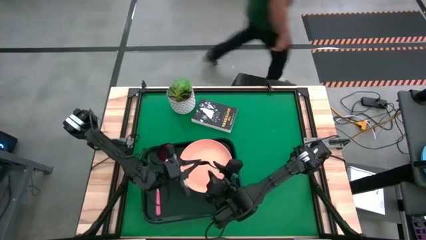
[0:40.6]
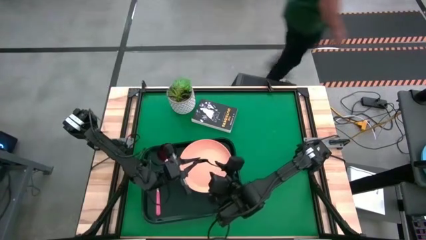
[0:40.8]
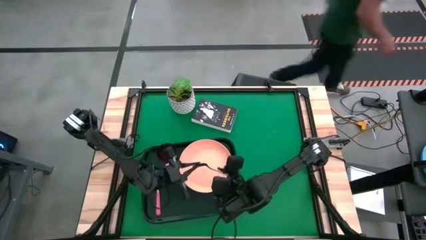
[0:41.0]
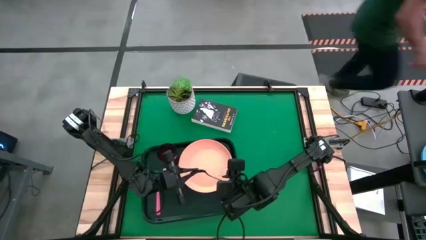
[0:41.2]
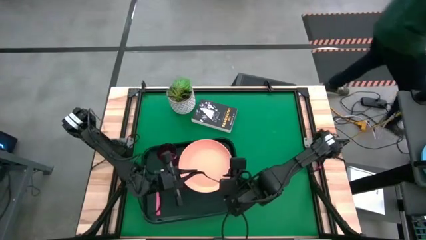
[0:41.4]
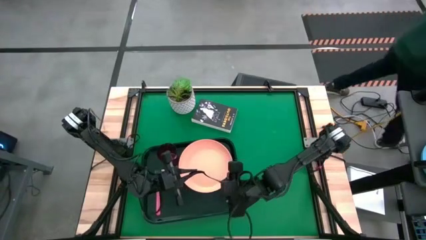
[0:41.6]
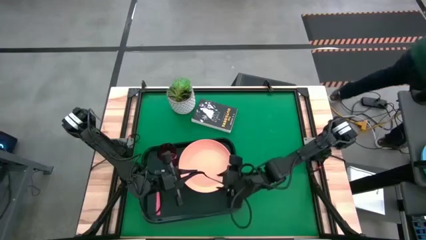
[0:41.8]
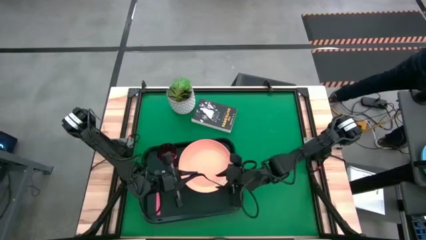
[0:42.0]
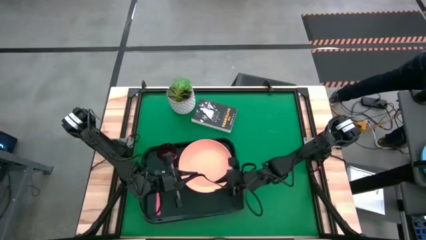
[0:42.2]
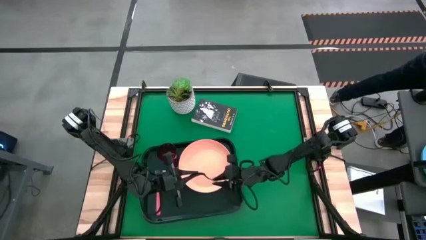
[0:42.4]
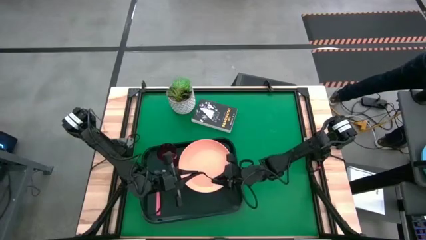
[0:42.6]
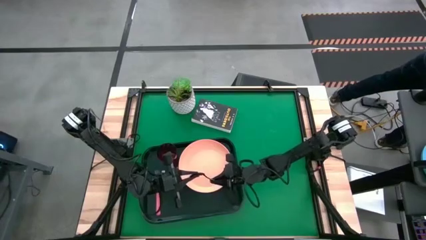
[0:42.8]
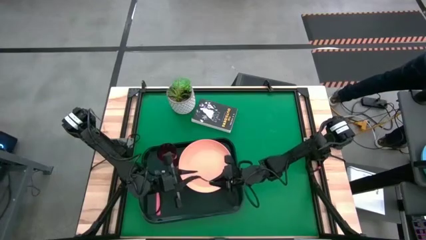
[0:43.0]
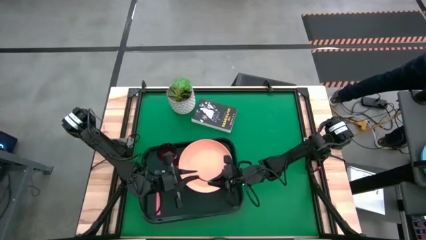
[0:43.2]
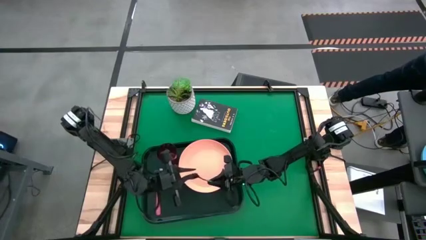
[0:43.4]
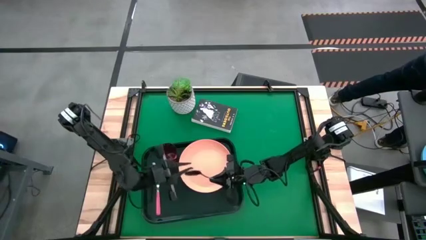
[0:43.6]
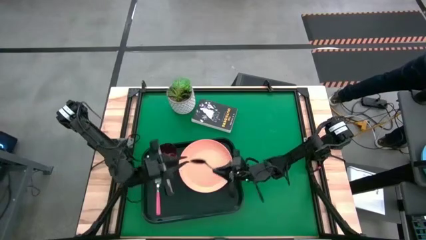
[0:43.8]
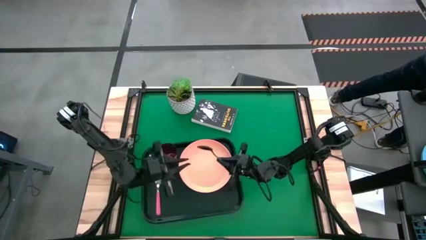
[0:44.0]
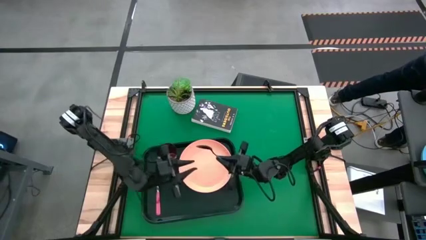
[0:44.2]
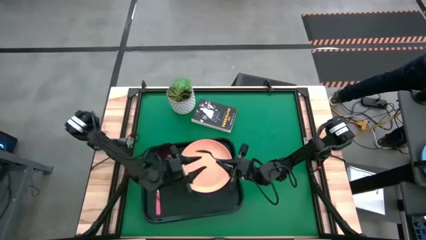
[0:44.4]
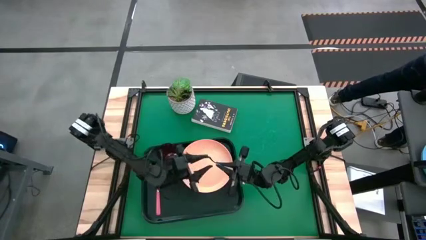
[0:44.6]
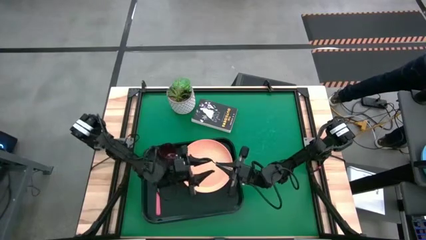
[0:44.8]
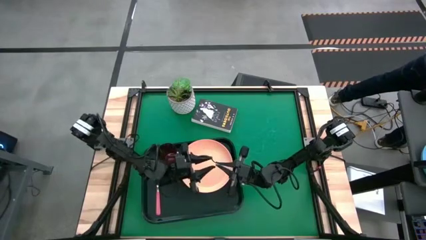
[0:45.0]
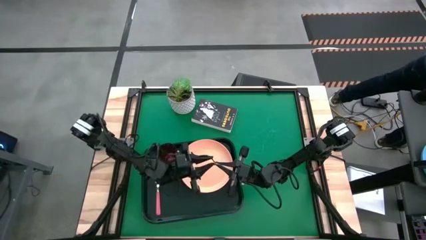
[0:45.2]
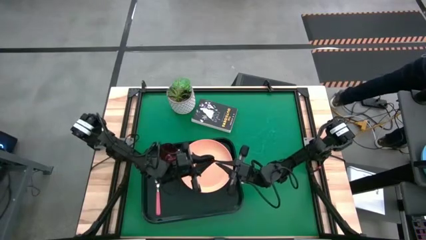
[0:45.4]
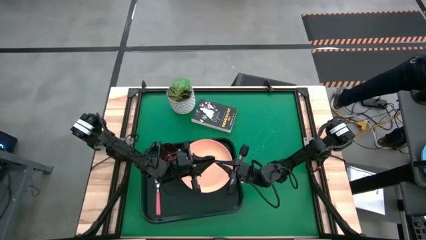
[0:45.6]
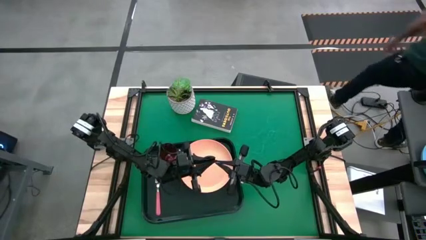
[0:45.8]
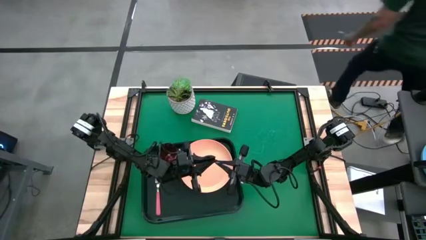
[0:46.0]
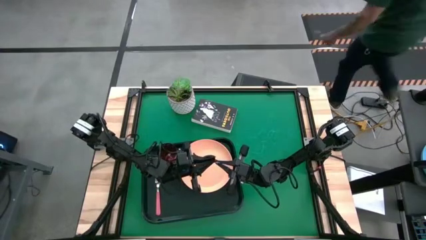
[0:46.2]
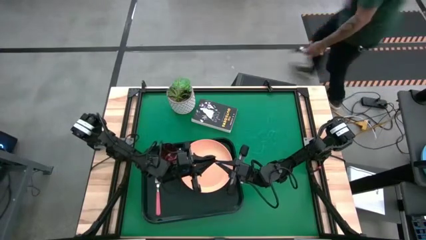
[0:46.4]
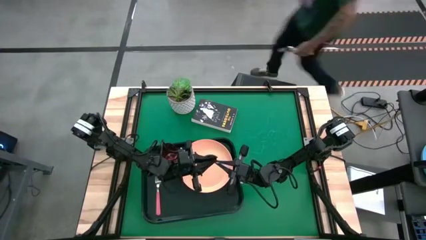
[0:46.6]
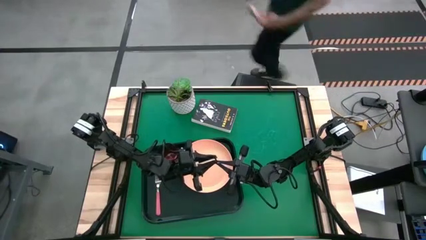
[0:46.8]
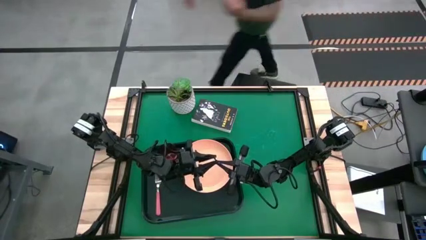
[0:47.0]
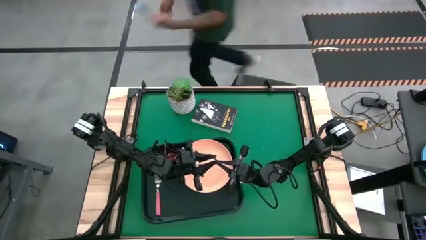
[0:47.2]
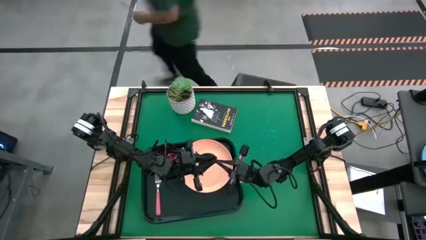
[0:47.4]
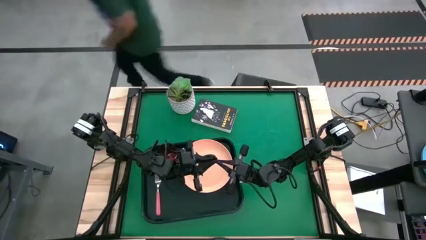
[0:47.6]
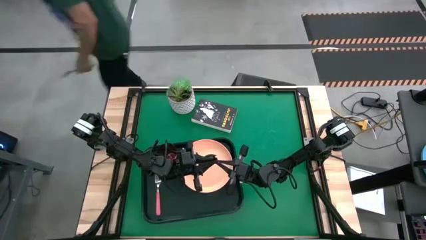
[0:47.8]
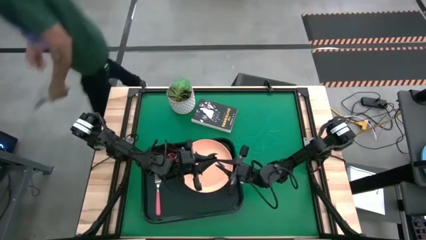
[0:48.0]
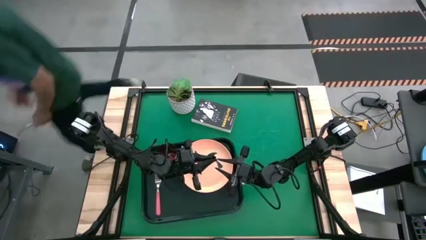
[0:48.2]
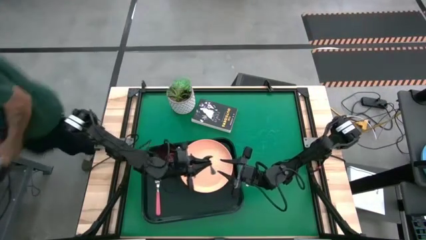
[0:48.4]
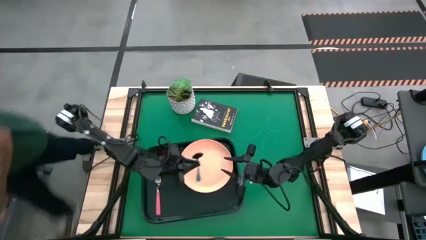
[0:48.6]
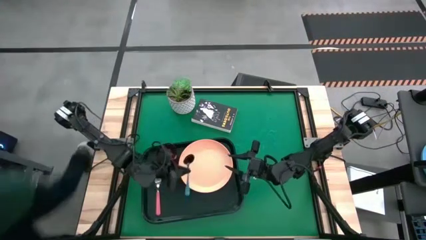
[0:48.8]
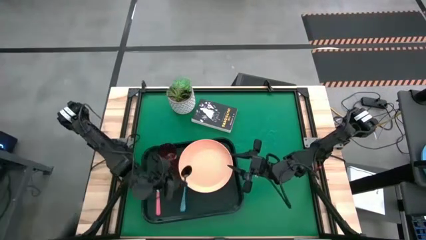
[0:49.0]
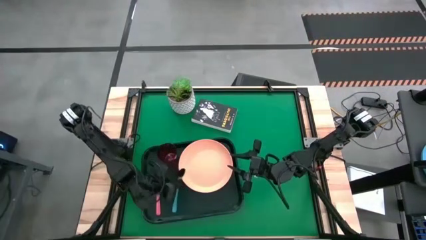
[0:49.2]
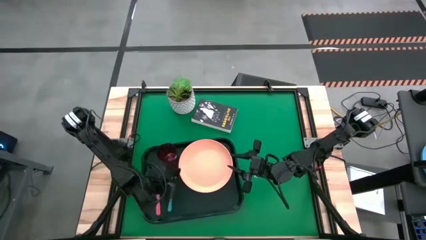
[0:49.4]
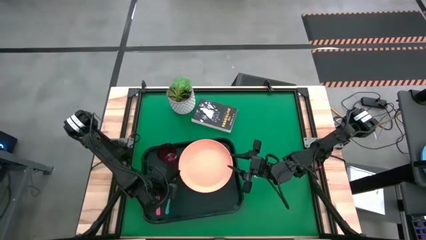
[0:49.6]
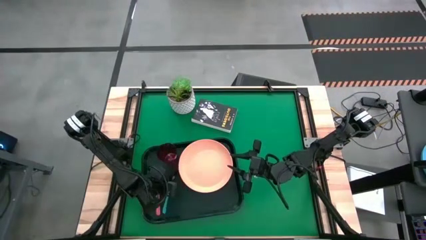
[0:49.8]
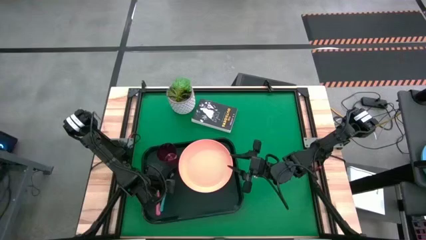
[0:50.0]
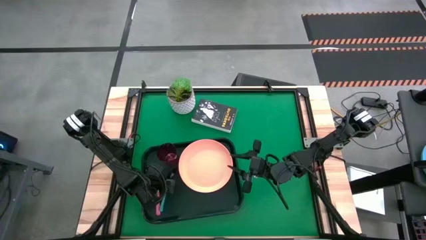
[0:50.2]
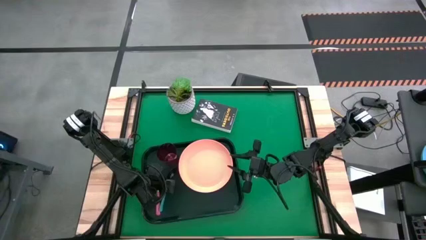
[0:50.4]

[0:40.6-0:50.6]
Task: Pick and place plate/cup/fork/spoon on tray
Put the blue spoon on the black table tray to the right of the pink fork

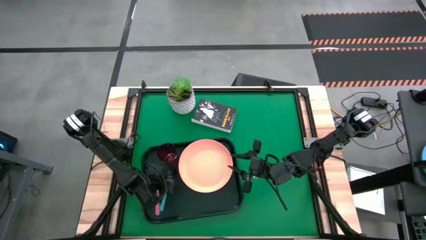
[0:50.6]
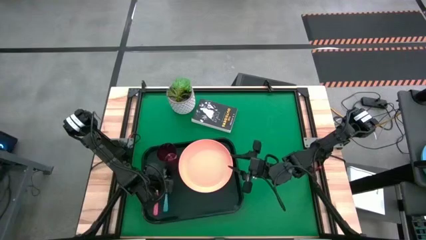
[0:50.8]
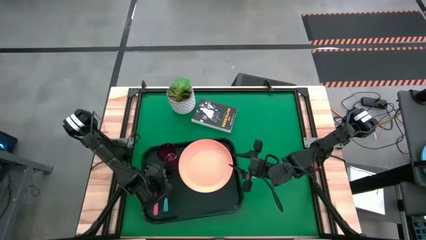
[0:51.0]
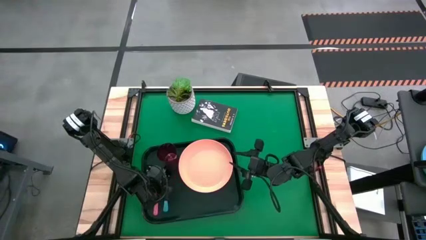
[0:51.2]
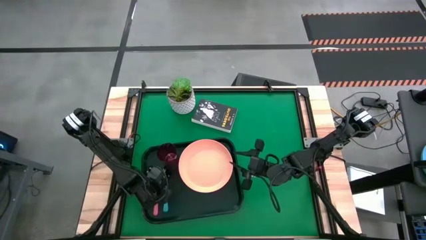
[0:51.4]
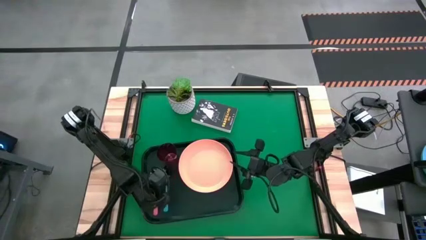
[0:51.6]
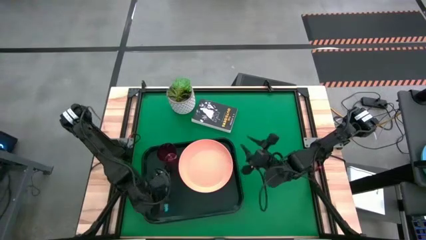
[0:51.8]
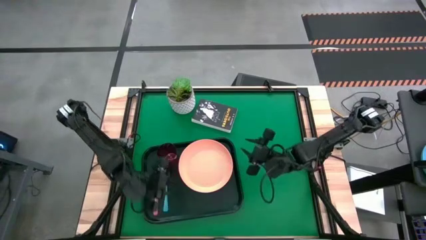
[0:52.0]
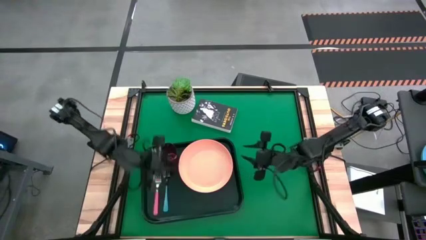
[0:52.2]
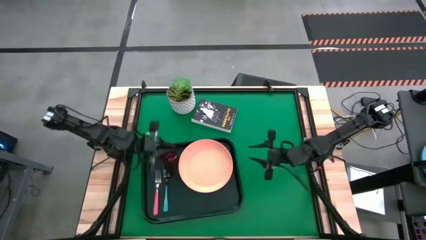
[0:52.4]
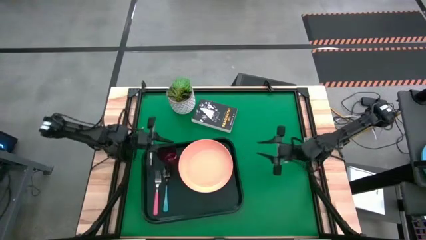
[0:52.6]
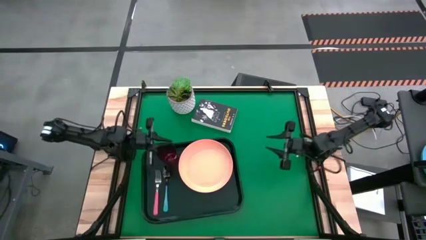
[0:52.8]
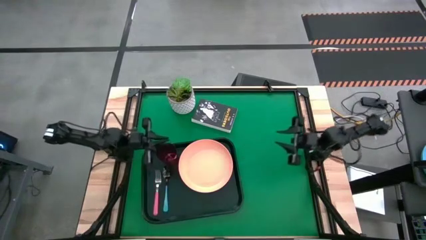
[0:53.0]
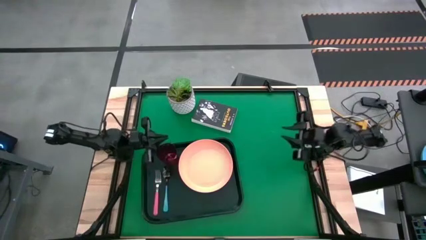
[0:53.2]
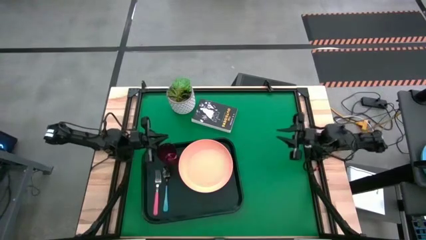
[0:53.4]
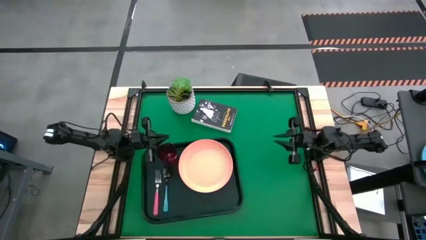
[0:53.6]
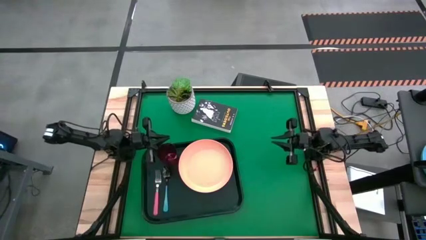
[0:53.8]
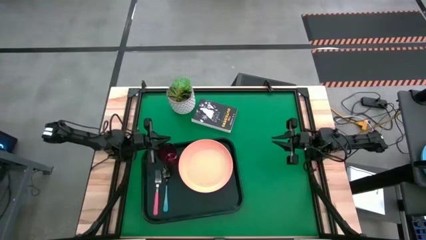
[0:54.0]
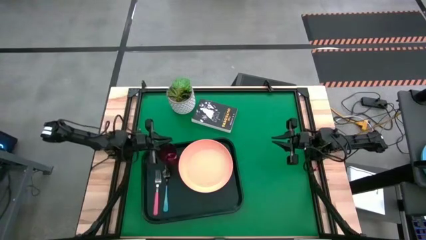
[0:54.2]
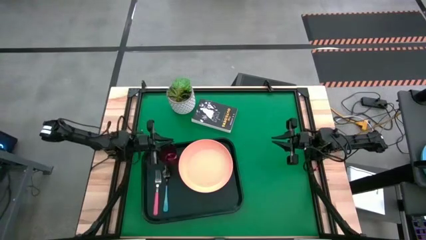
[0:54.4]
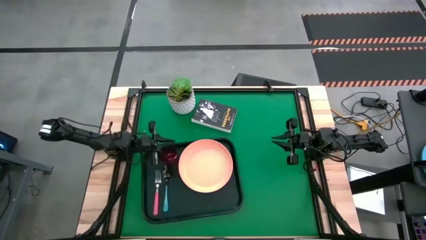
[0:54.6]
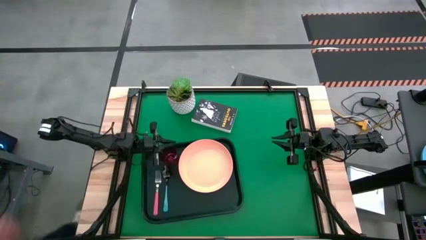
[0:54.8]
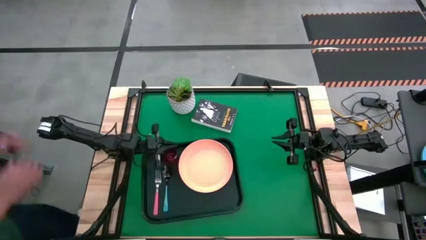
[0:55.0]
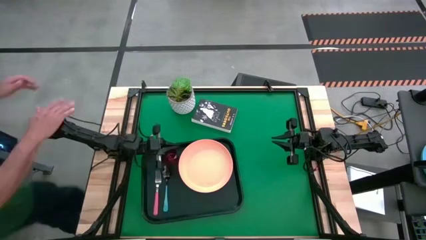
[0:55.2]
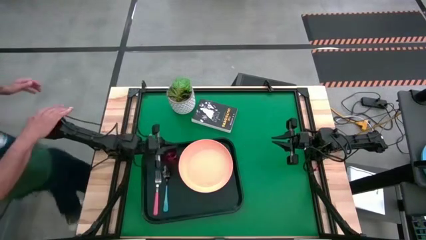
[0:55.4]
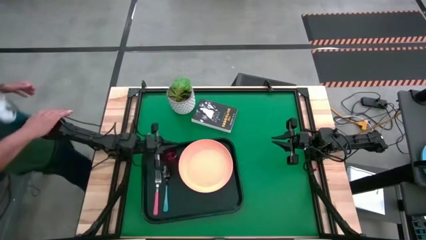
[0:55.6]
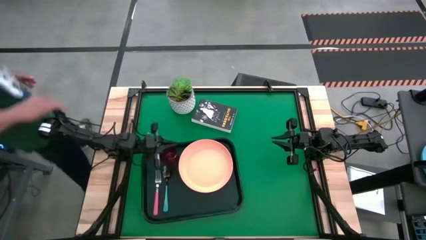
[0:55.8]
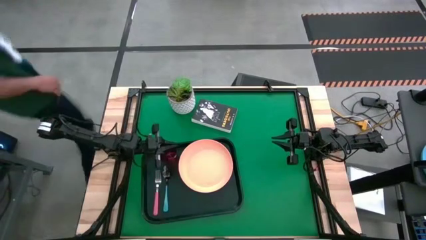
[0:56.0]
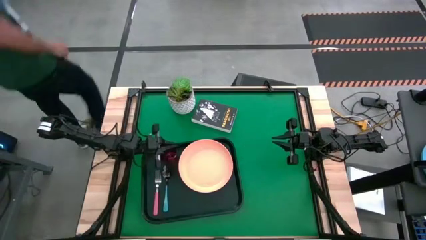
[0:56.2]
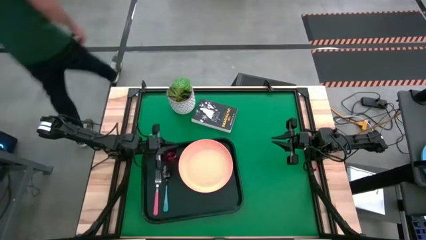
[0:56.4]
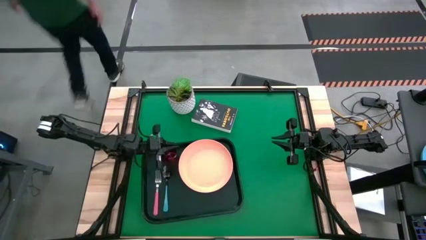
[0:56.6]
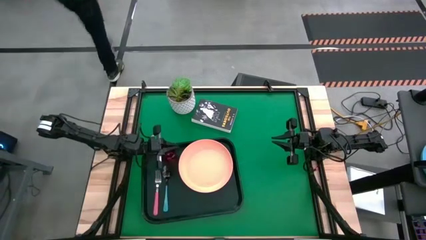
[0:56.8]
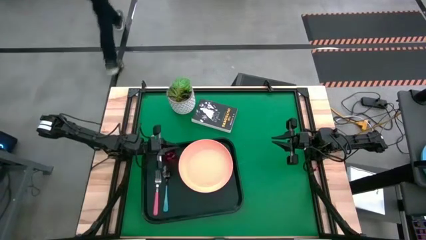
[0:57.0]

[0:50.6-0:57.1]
Return to Home Position
